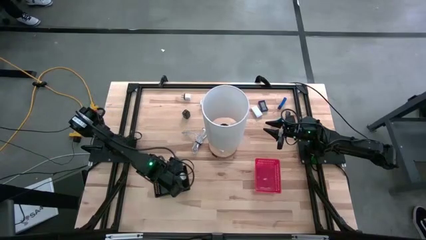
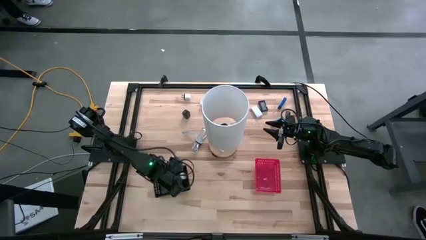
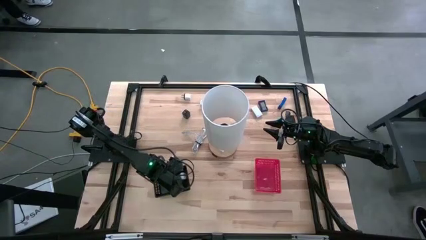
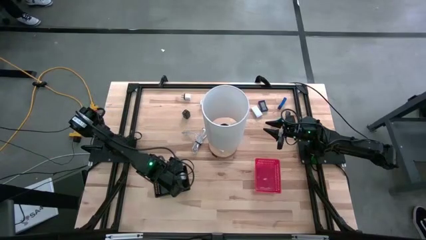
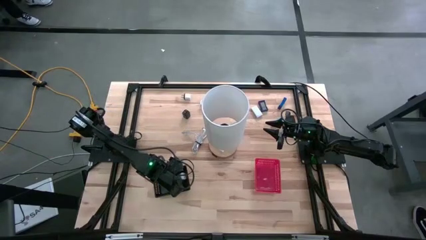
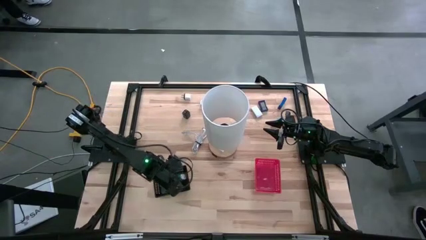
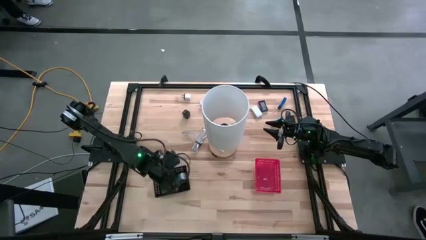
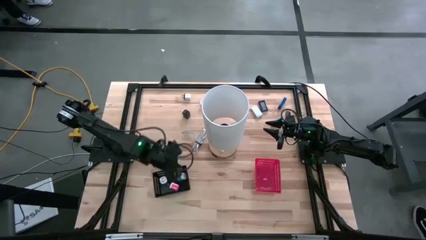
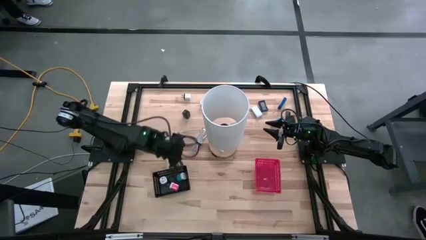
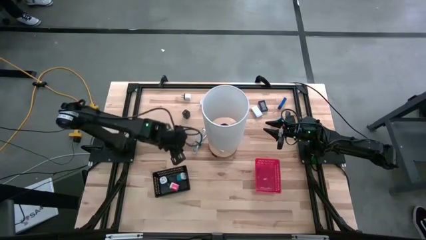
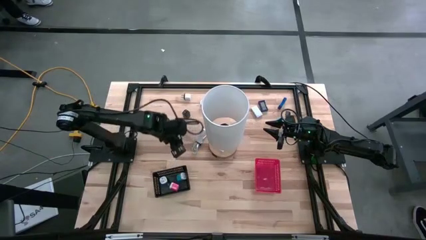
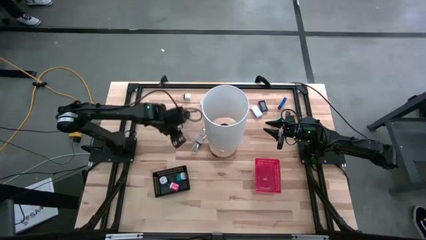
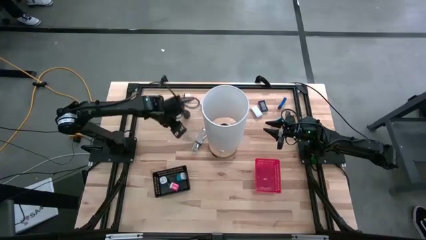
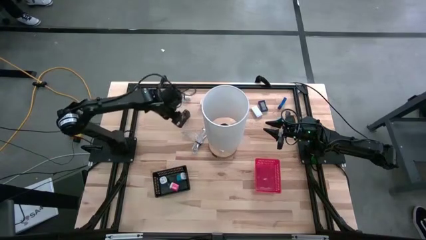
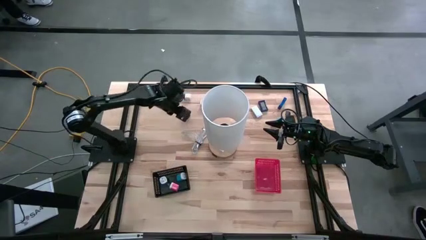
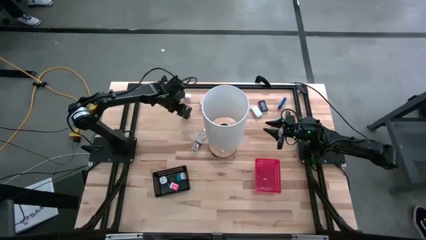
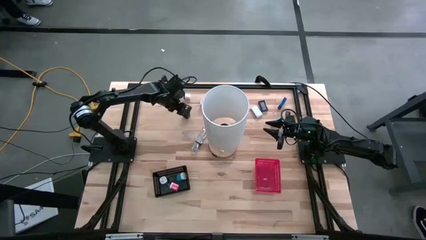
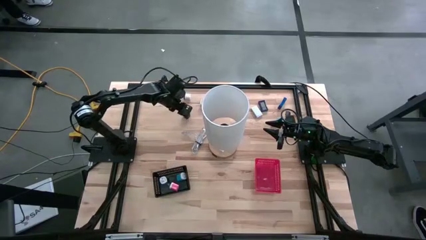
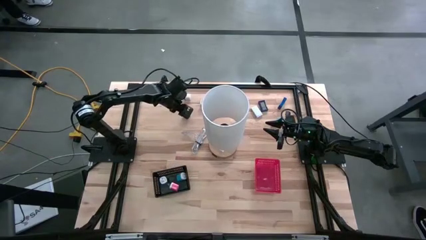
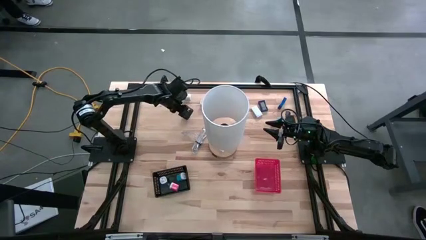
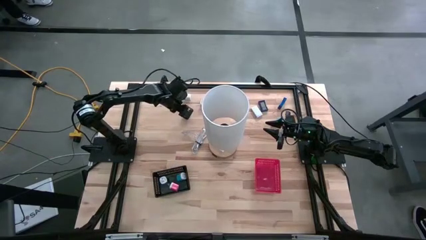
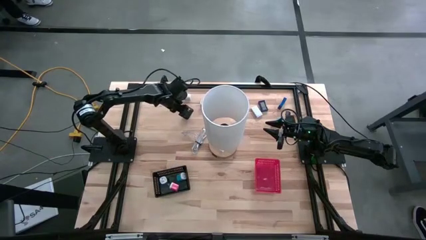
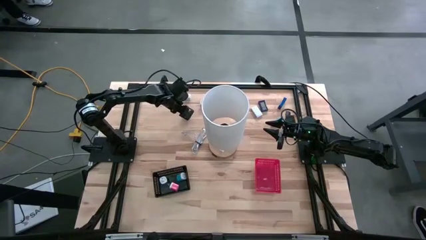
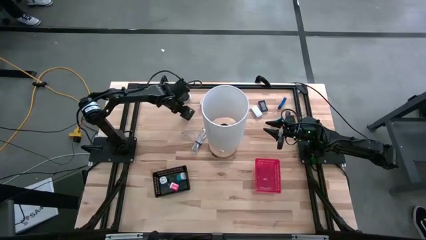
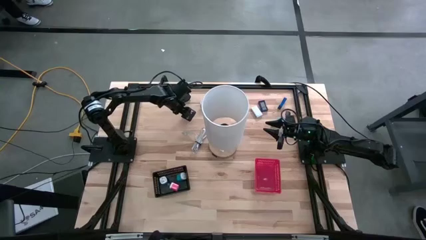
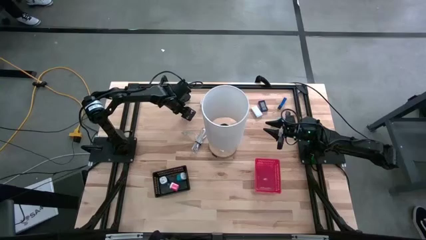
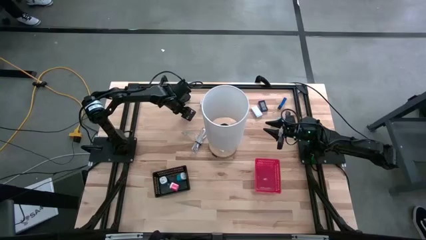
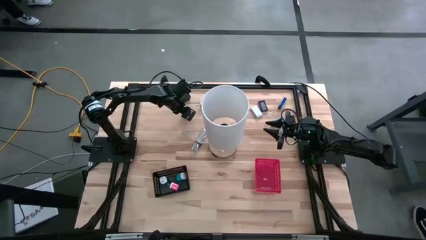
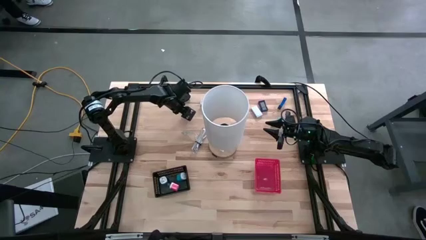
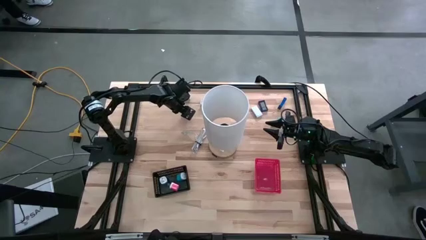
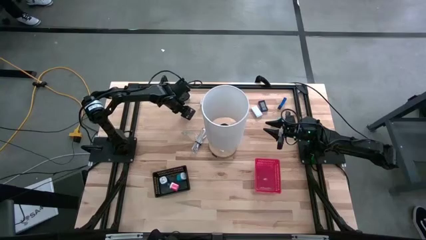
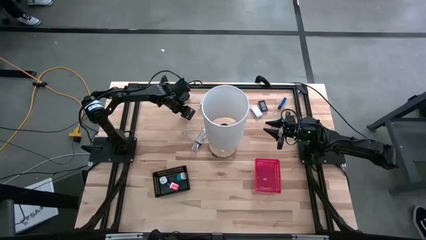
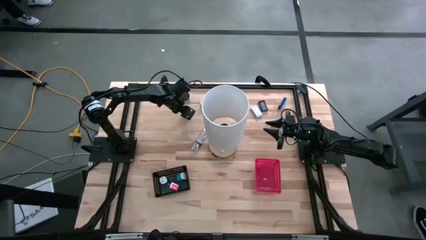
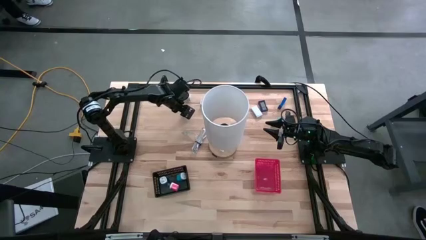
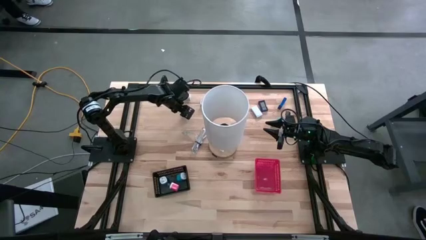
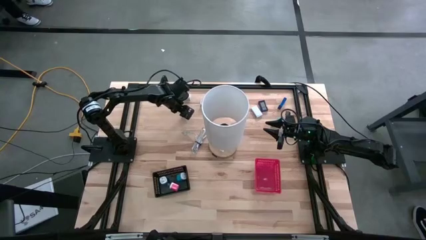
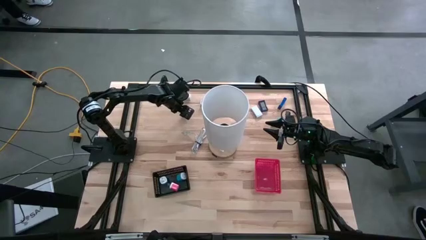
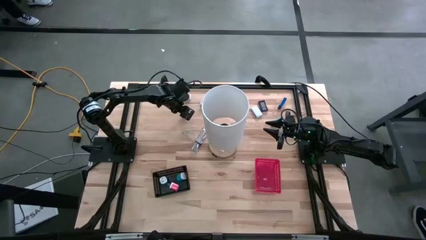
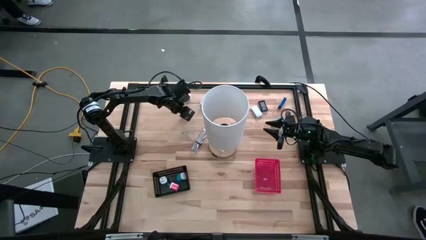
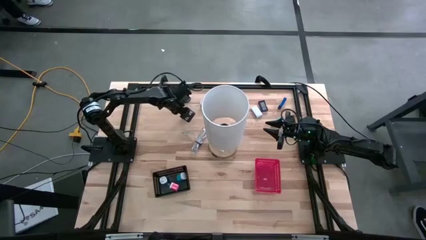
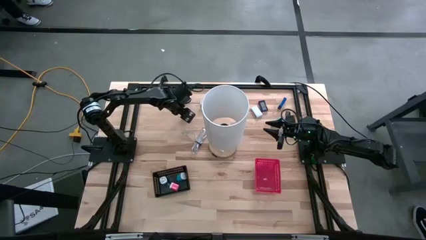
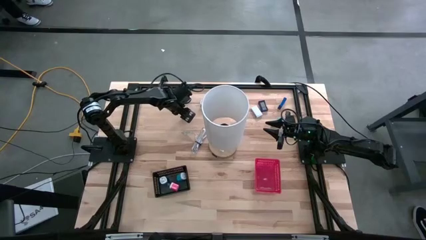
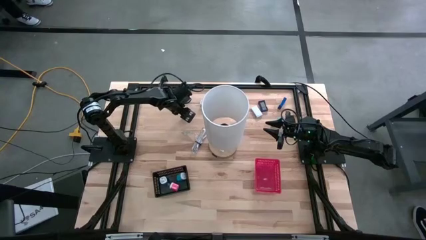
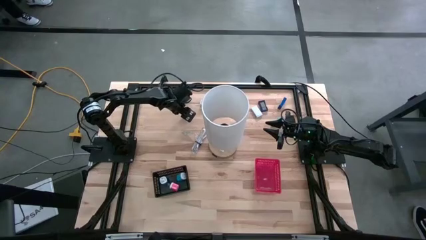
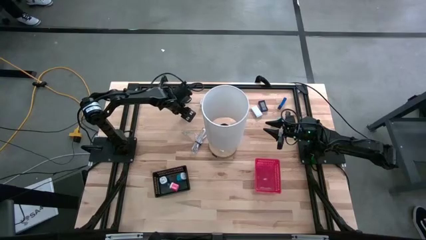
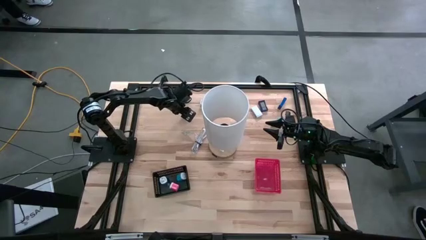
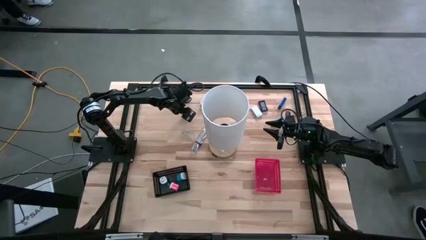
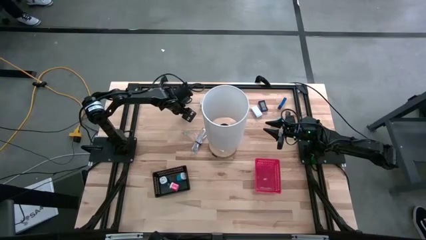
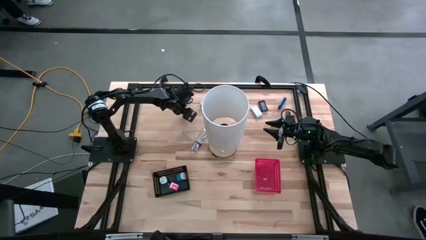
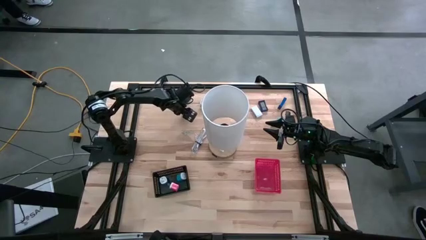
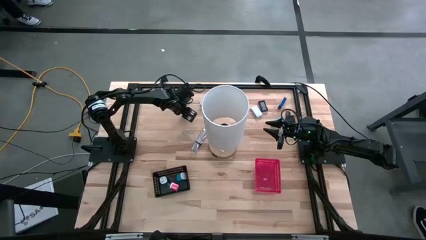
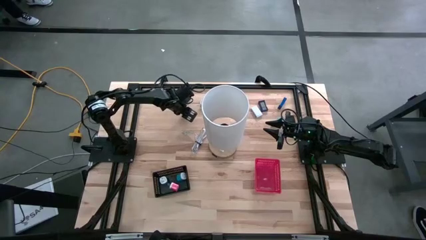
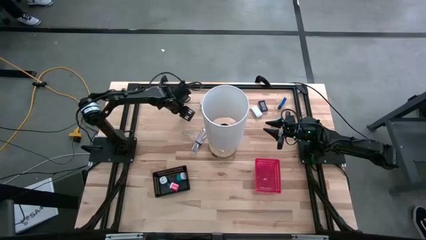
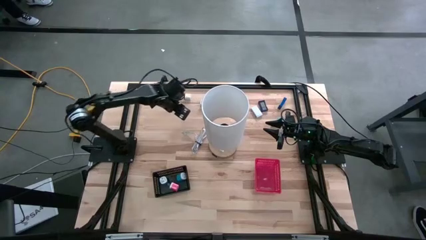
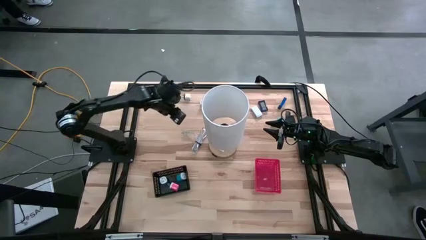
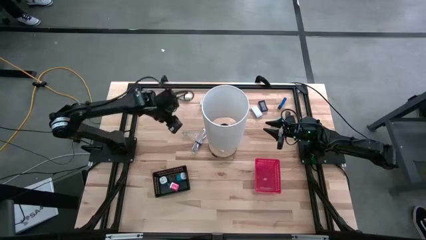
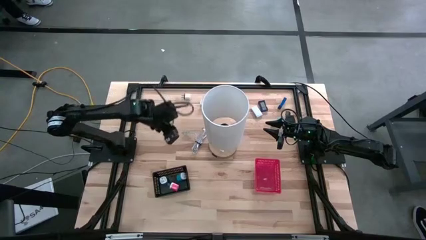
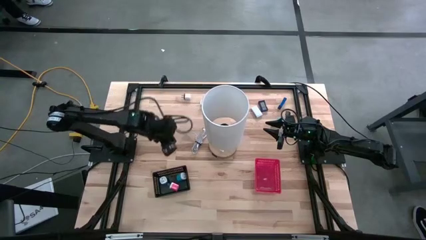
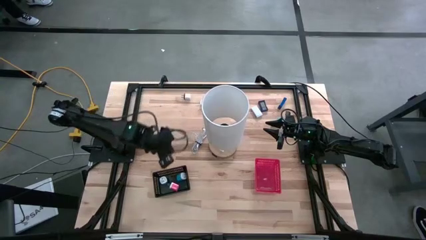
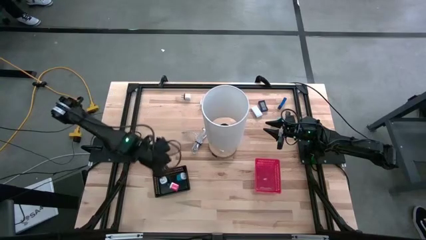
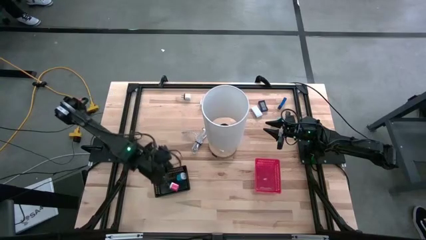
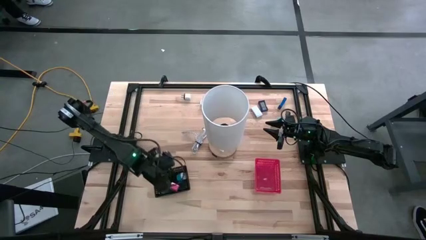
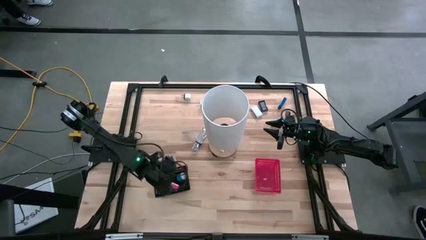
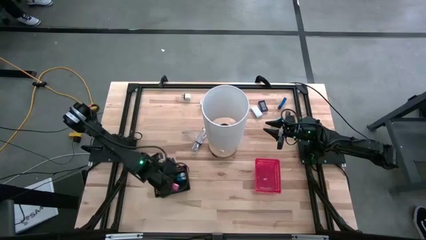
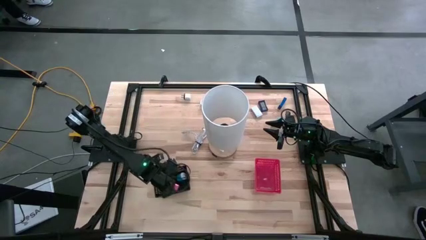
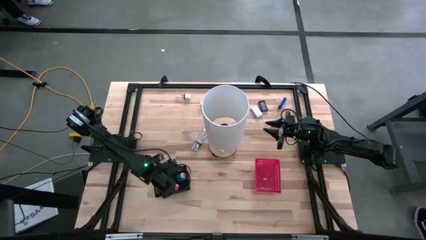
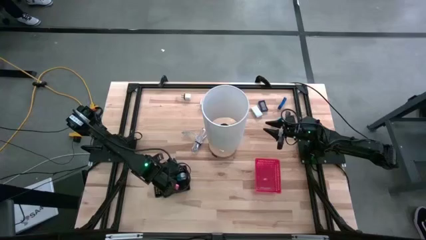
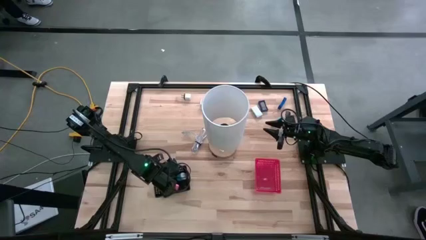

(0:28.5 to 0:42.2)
Task: Pick & Place Office items
Put the left black charger adapter into the black bin
